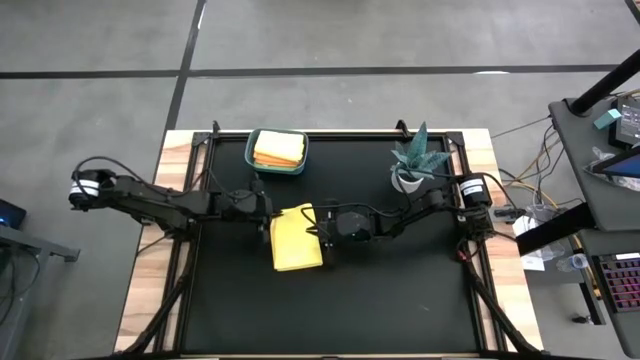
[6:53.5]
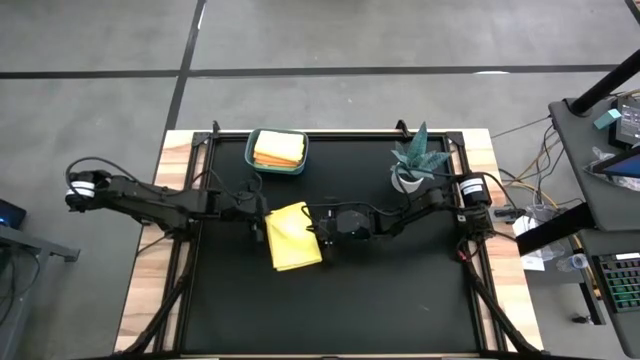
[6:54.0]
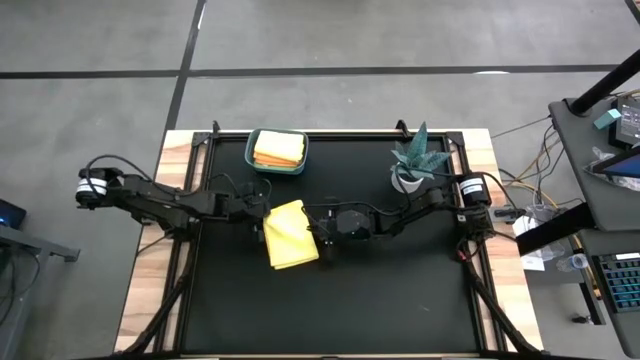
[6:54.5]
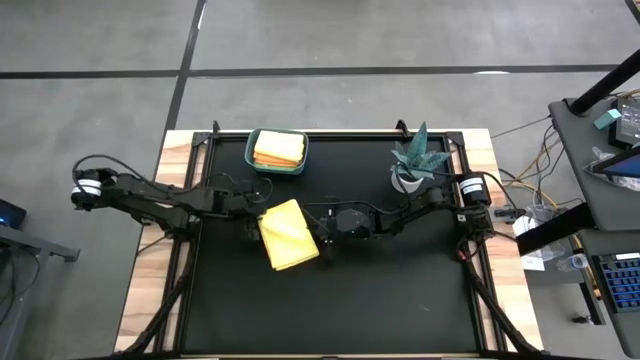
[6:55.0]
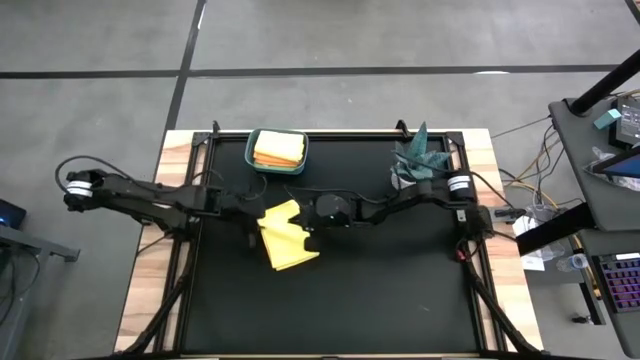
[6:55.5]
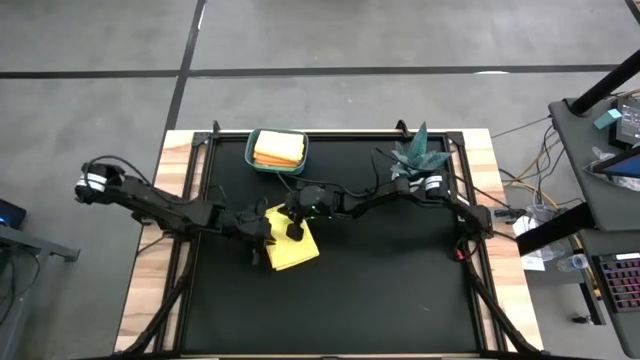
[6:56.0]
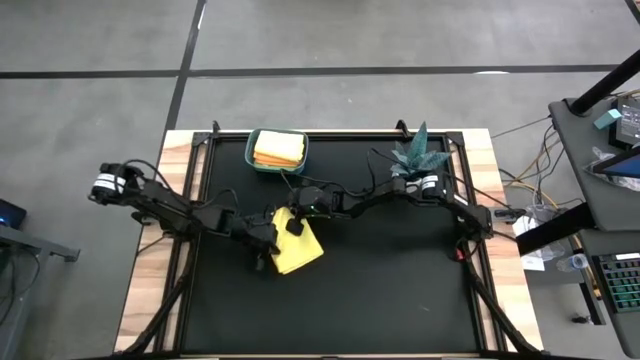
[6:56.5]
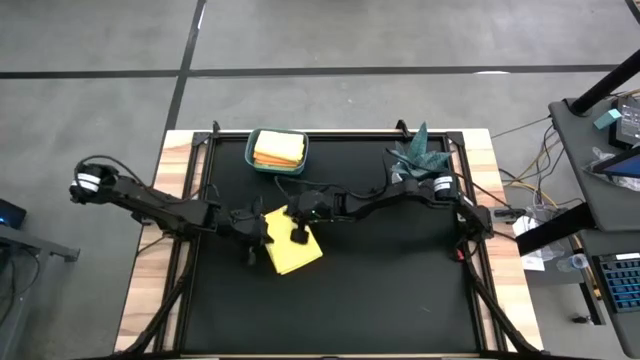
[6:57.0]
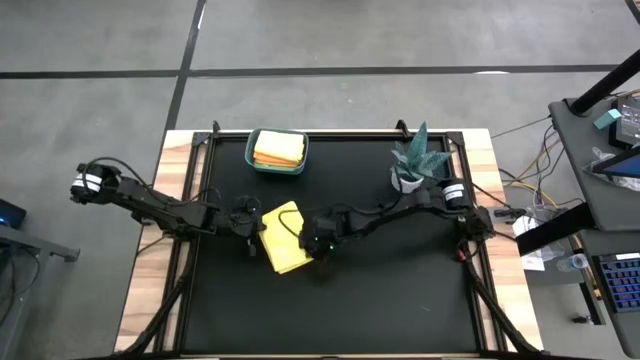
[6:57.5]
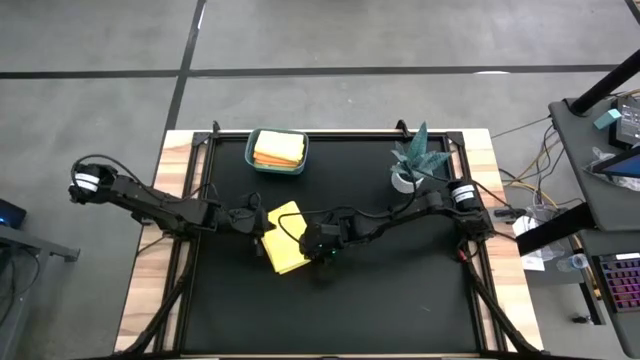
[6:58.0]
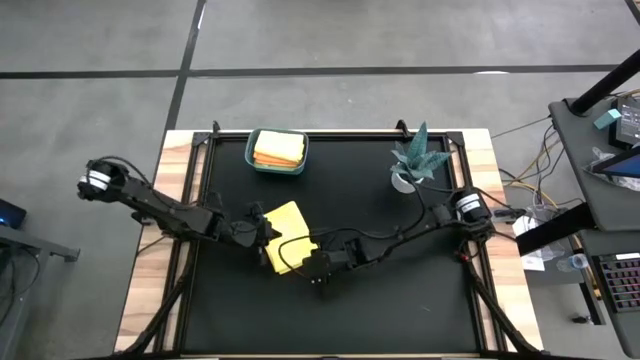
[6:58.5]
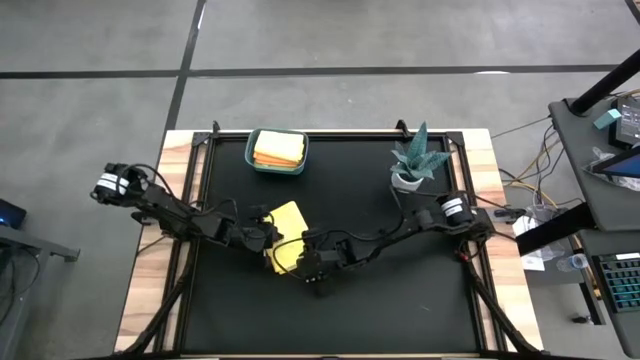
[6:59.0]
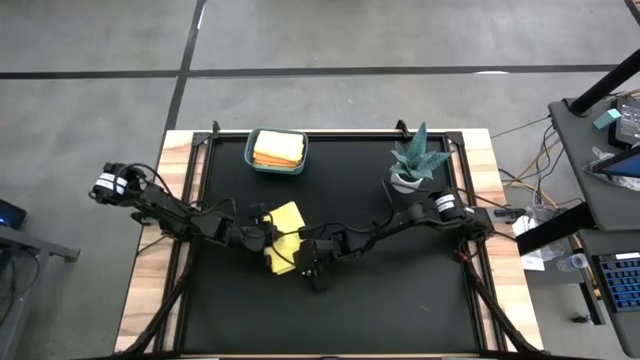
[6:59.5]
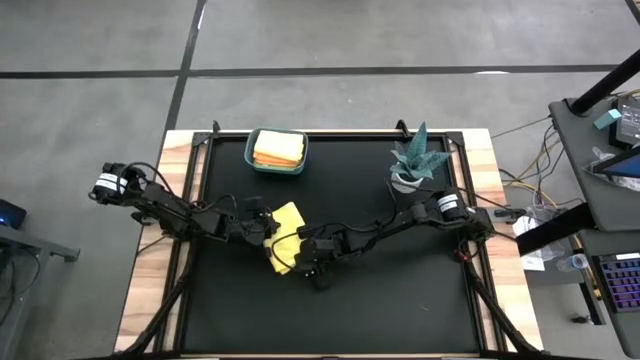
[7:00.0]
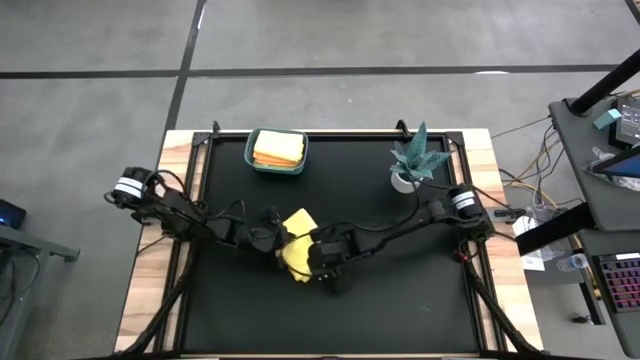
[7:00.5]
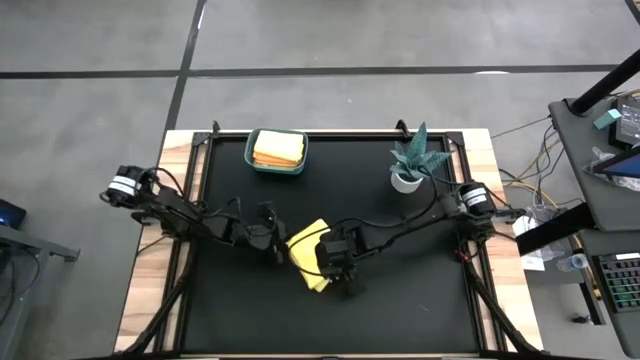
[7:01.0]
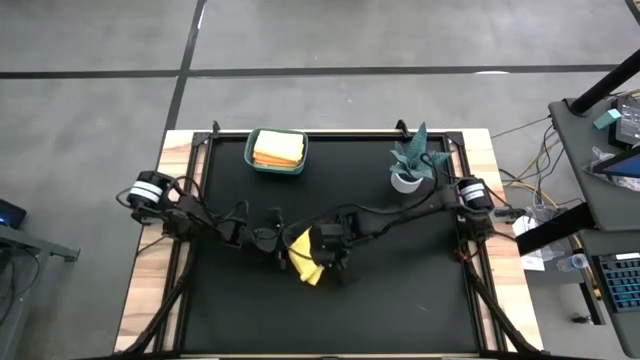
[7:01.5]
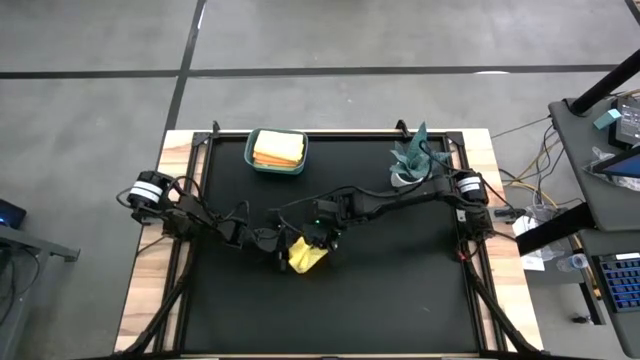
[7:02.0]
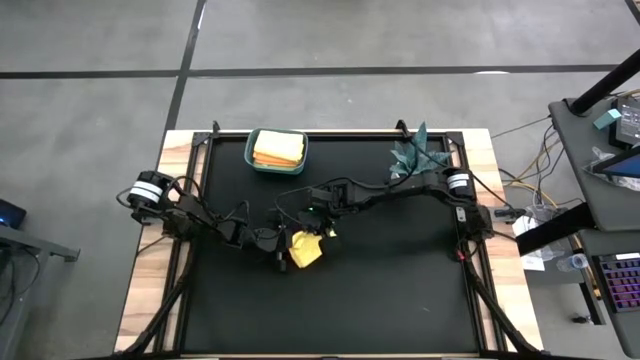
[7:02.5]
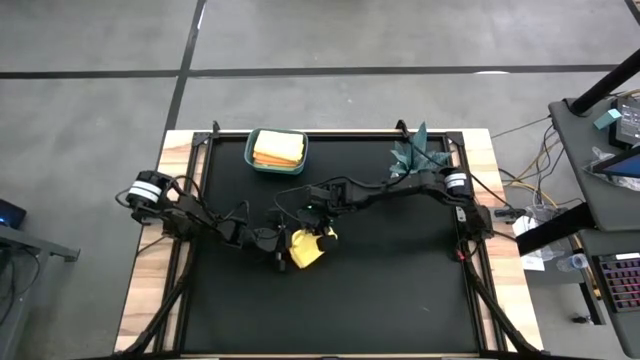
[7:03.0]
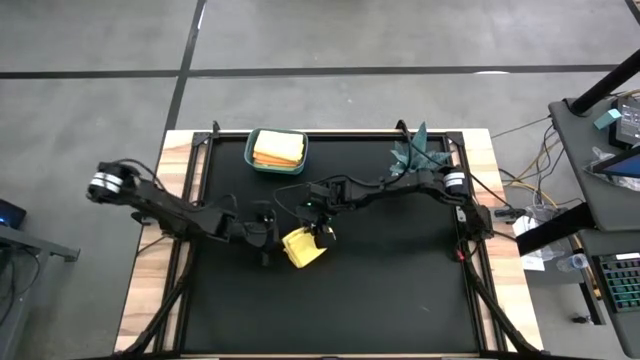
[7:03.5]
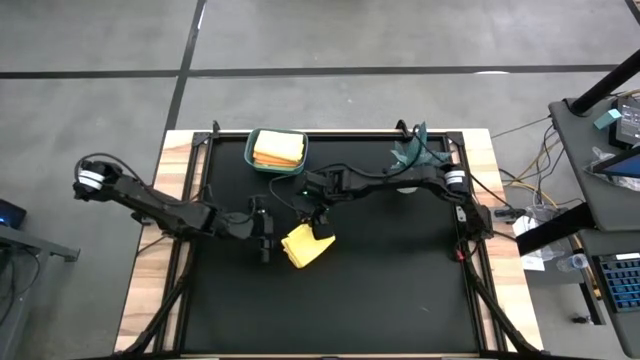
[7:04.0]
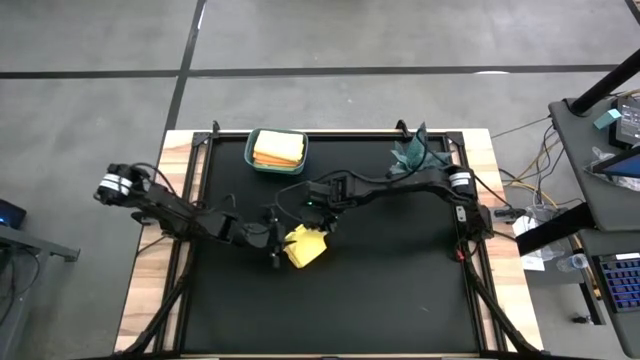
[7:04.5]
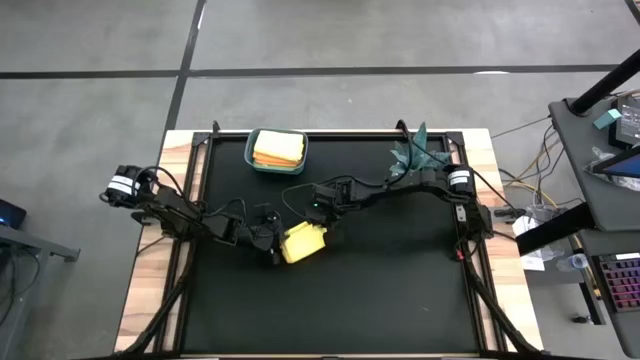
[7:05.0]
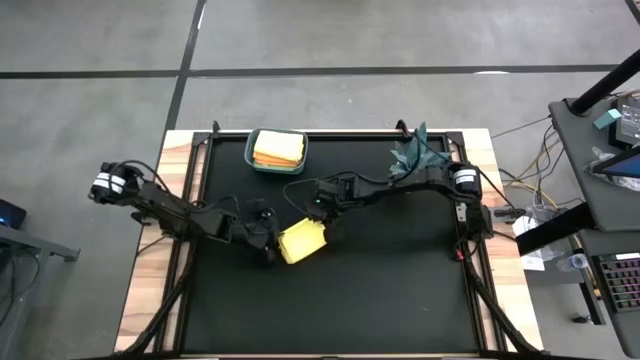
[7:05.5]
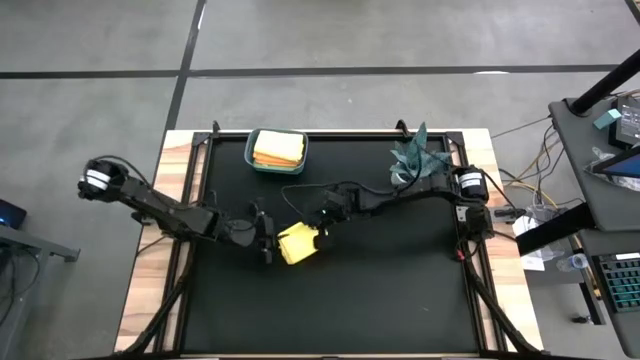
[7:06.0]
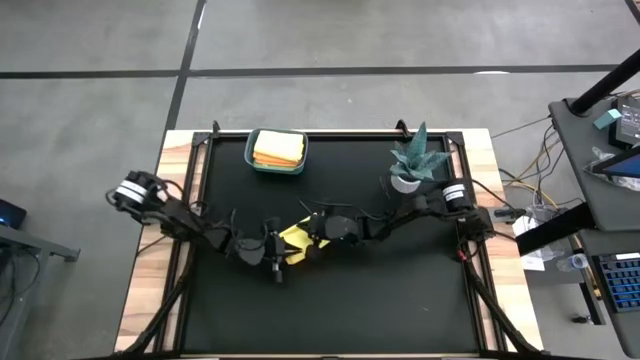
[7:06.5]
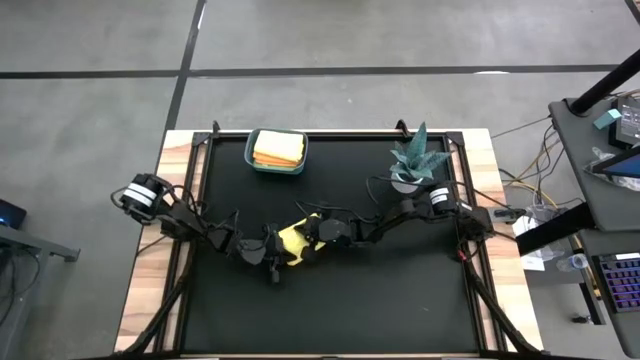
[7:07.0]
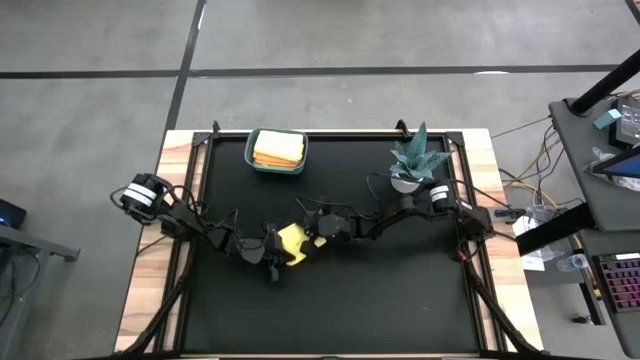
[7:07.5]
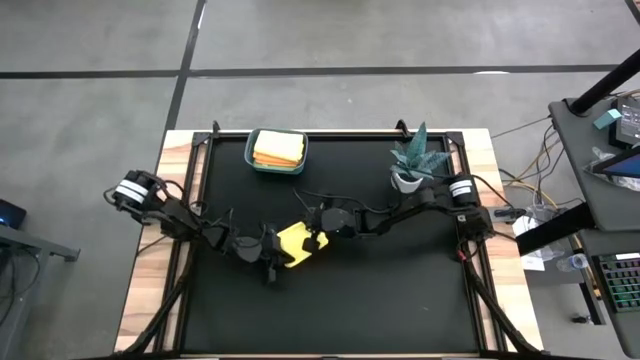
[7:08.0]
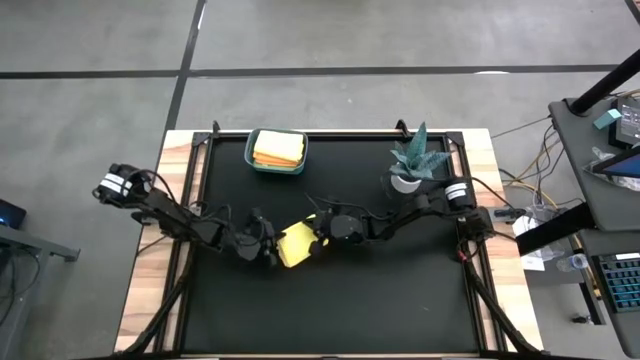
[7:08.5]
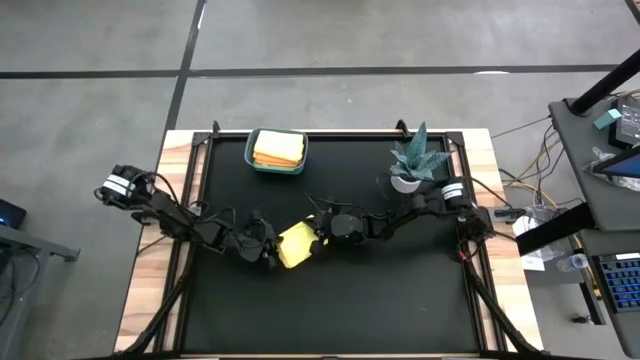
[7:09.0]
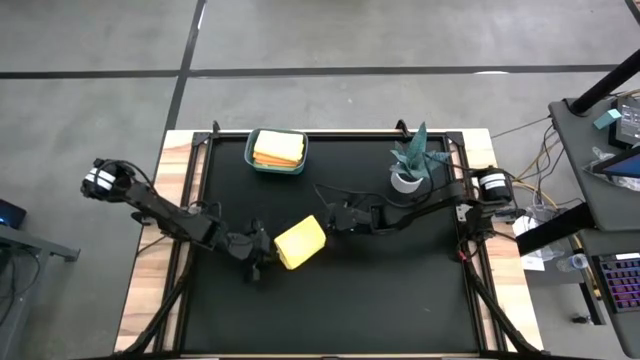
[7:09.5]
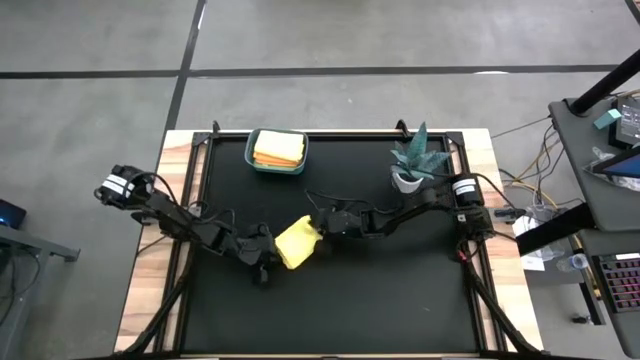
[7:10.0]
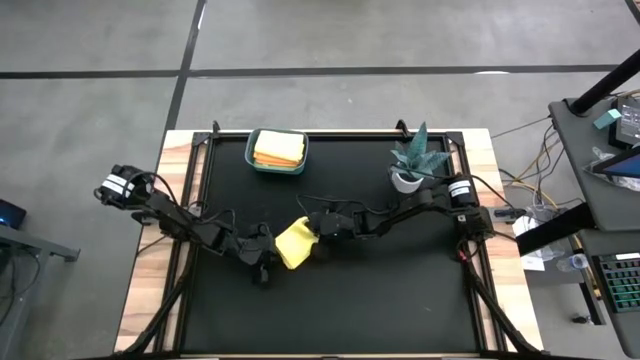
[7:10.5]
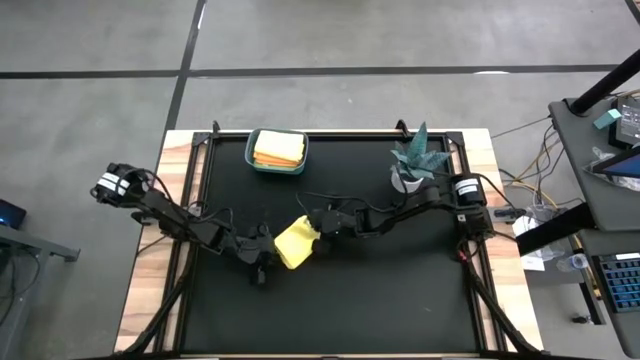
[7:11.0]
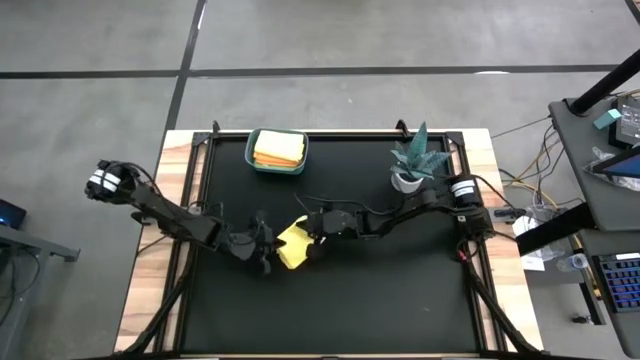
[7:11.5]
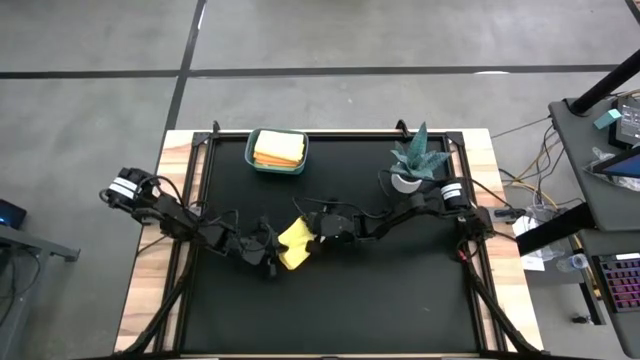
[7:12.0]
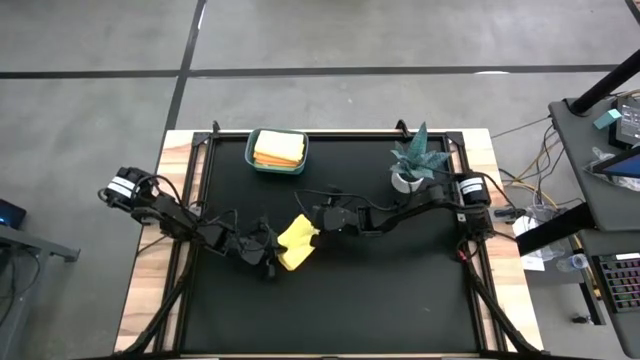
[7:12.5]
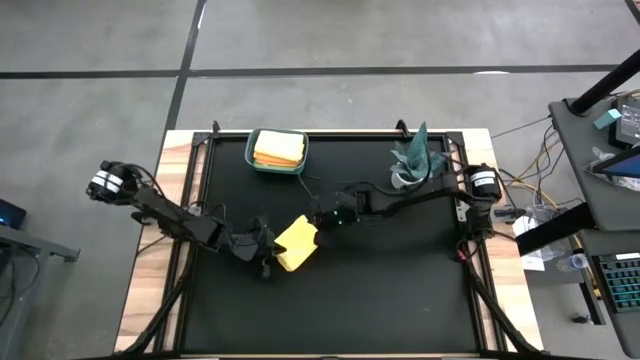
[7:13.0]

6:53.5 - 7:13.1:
Task: Fold microfiber towels
Fold the yellow microfiber cloth

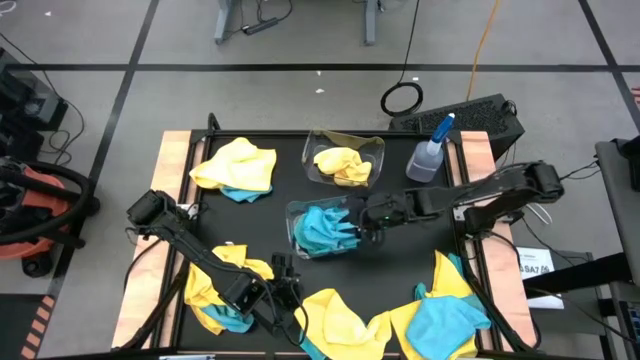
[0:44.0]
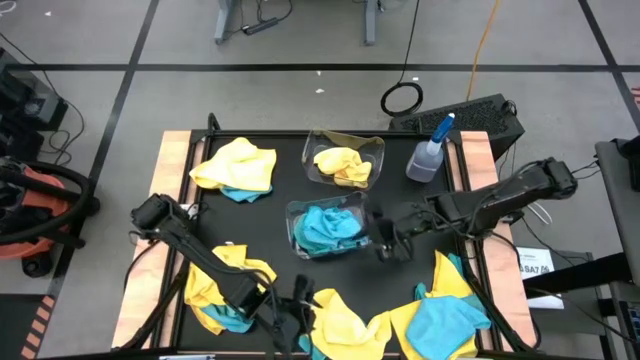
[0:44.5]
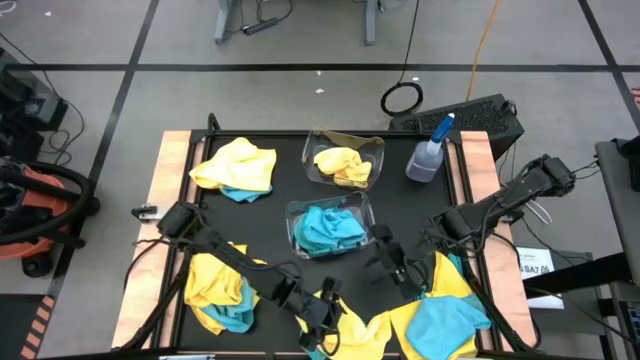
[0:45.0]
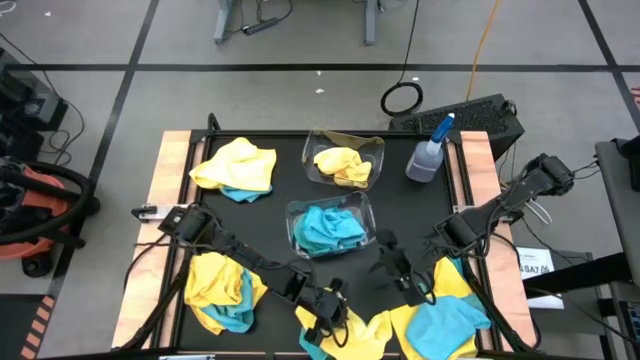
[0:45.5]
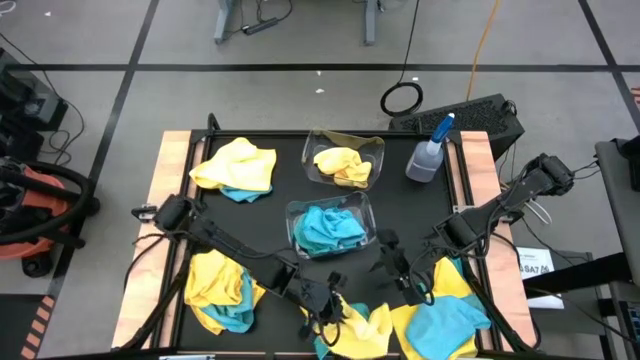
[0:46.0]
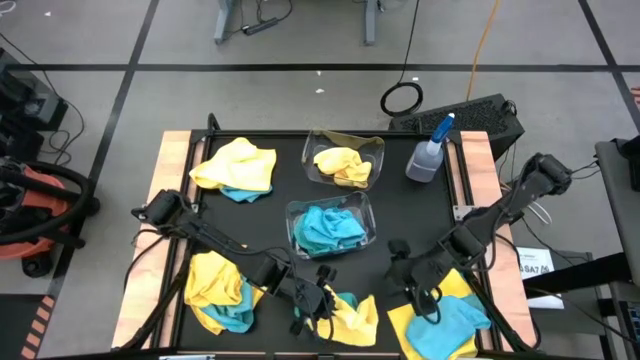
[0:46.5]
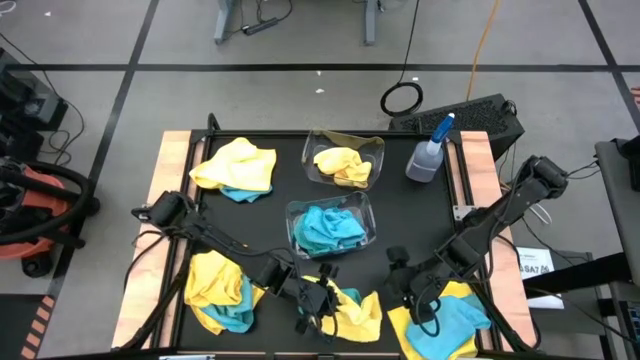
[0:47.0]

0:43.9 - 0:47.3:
Task: Sort microfiber towel by color & place in baskets
Put the yellow microfiber cloth into the top transparent bin
